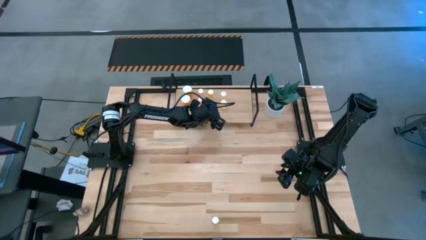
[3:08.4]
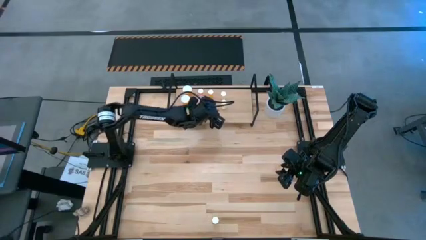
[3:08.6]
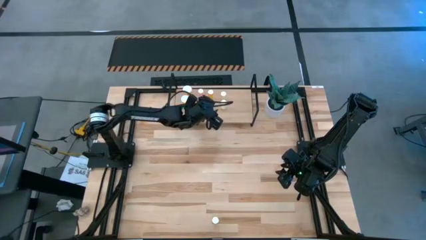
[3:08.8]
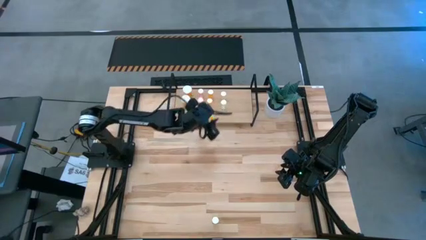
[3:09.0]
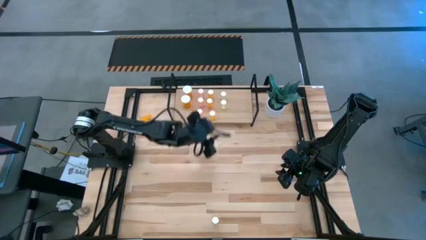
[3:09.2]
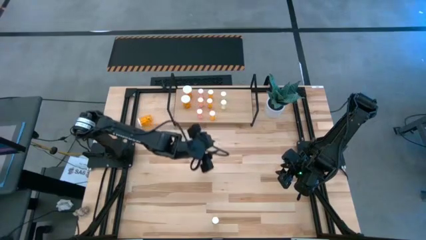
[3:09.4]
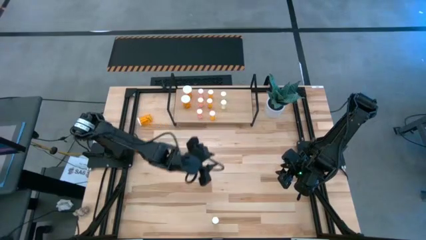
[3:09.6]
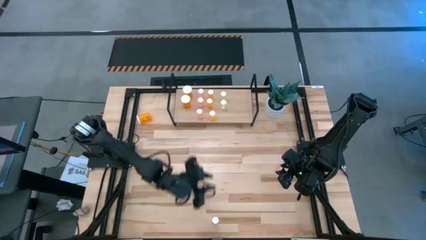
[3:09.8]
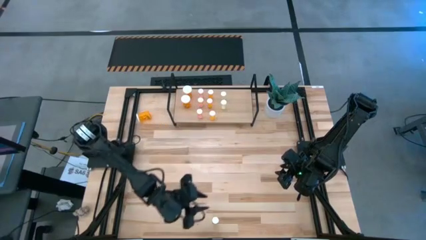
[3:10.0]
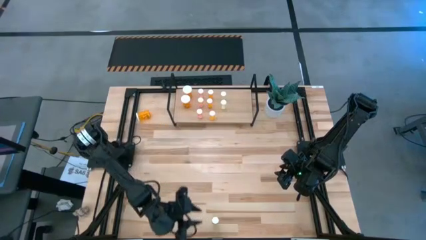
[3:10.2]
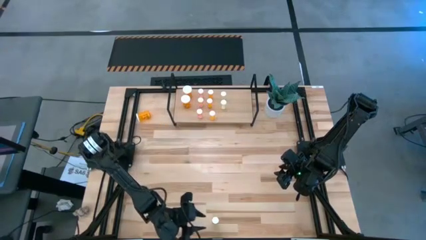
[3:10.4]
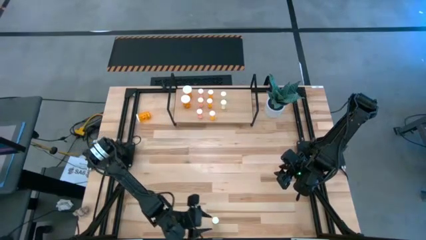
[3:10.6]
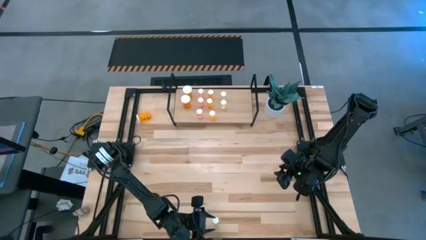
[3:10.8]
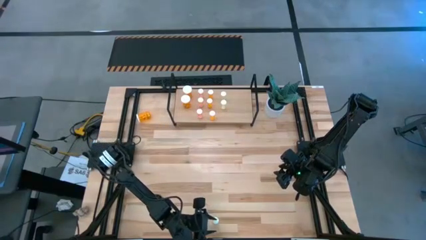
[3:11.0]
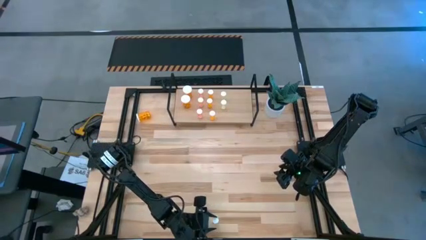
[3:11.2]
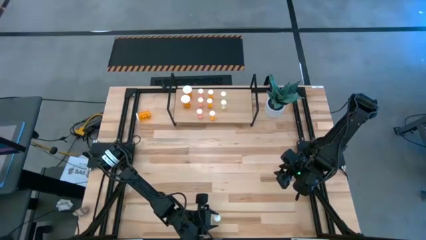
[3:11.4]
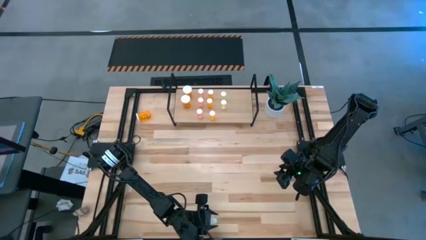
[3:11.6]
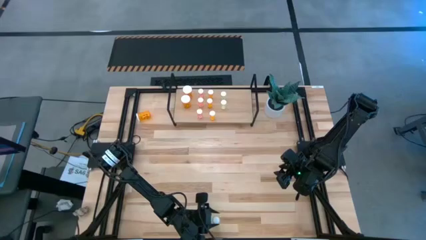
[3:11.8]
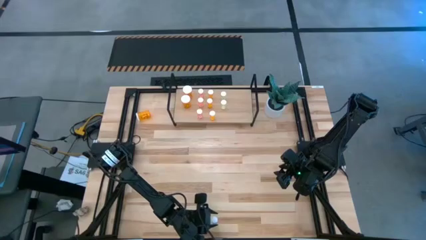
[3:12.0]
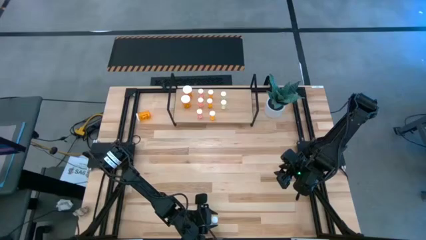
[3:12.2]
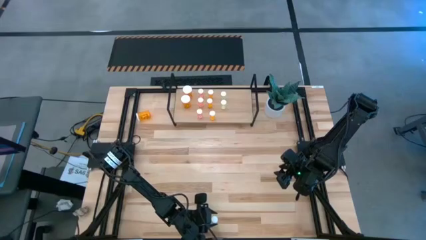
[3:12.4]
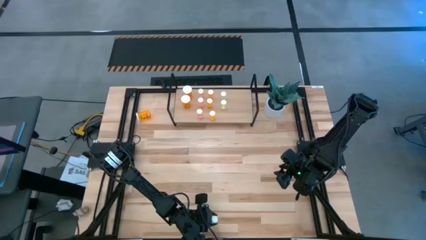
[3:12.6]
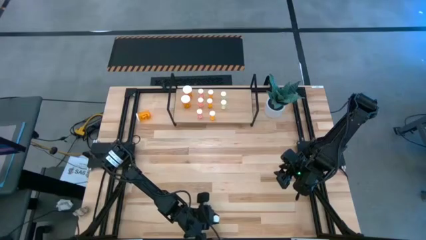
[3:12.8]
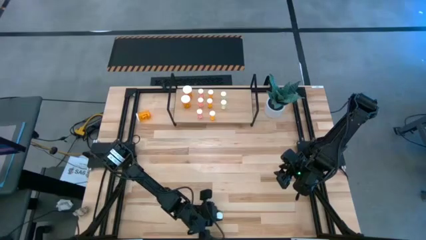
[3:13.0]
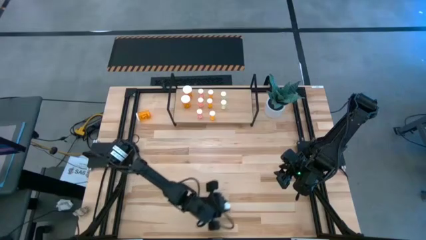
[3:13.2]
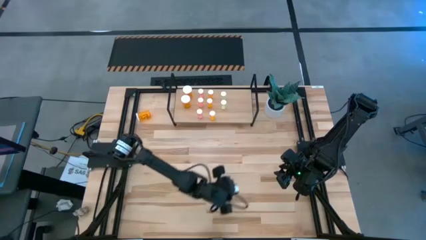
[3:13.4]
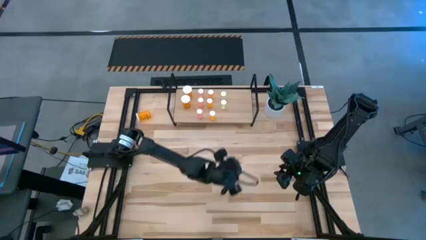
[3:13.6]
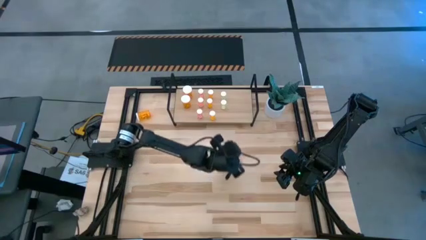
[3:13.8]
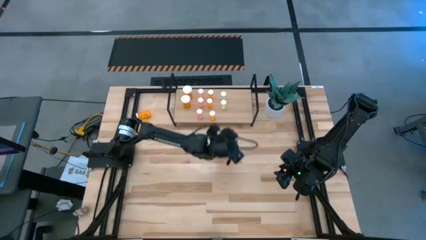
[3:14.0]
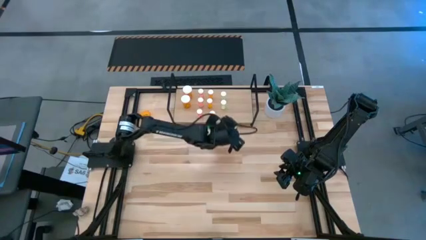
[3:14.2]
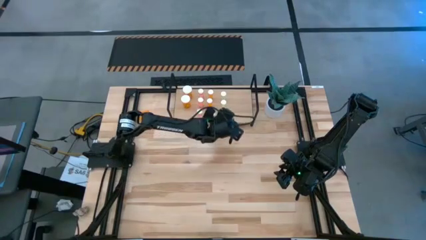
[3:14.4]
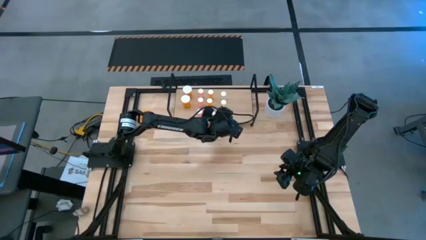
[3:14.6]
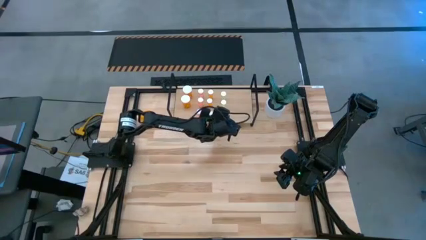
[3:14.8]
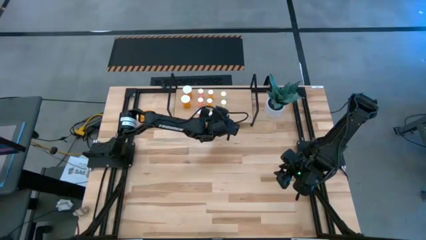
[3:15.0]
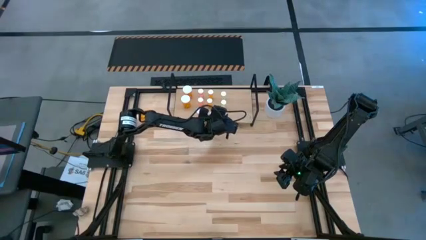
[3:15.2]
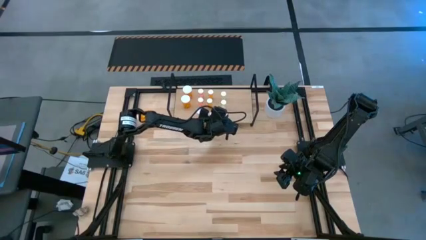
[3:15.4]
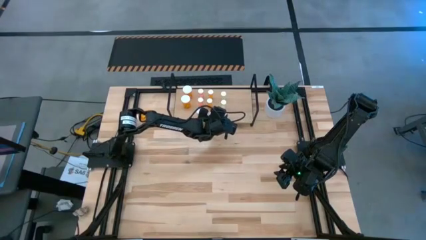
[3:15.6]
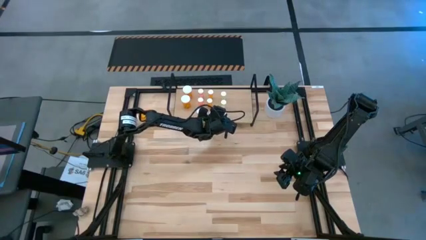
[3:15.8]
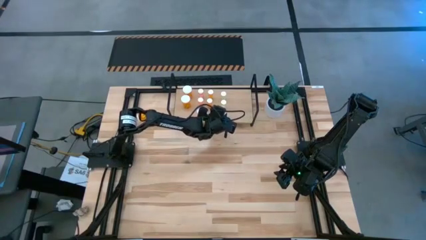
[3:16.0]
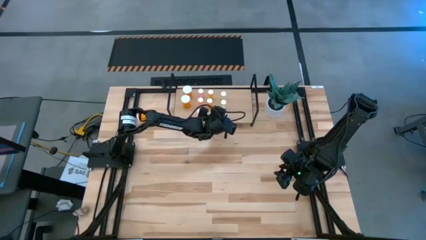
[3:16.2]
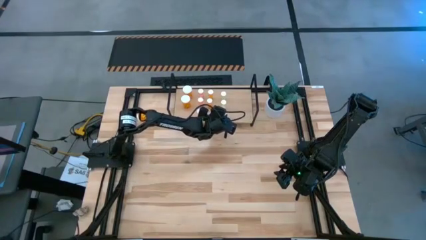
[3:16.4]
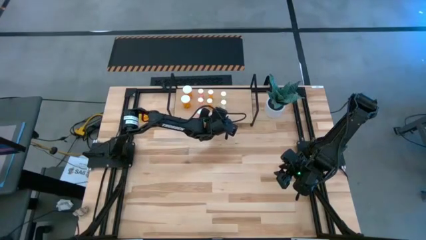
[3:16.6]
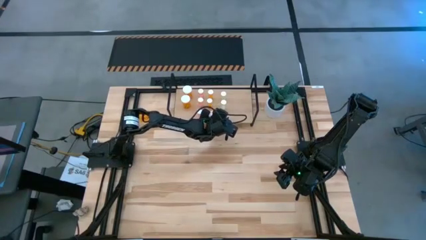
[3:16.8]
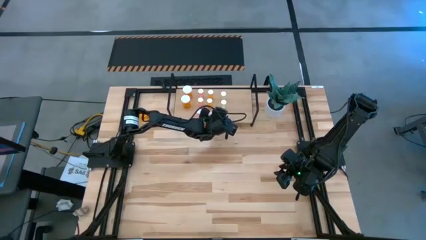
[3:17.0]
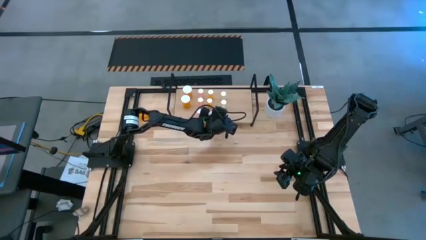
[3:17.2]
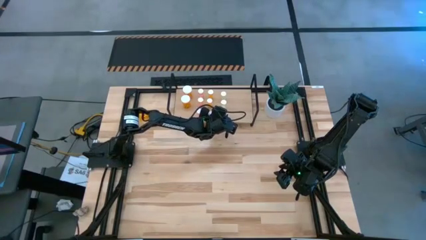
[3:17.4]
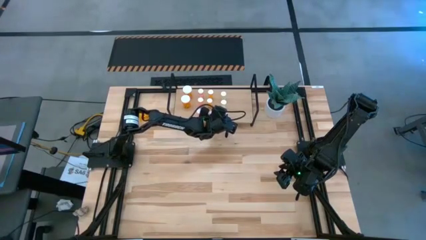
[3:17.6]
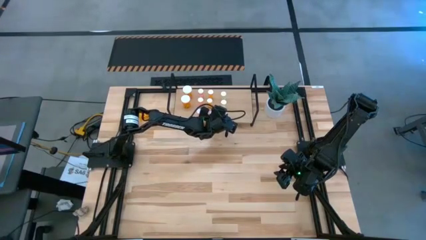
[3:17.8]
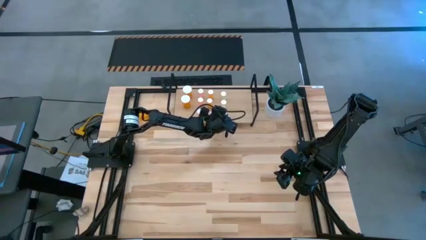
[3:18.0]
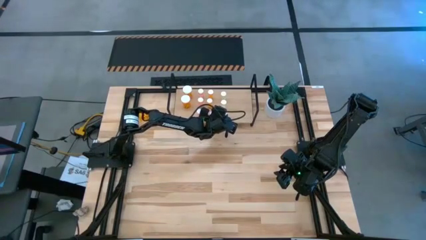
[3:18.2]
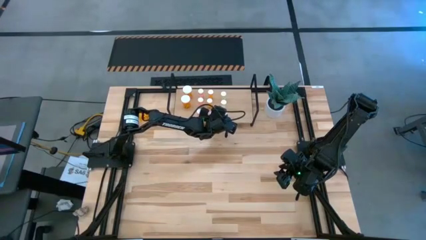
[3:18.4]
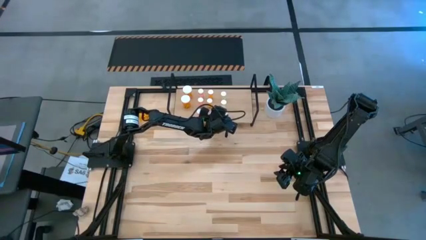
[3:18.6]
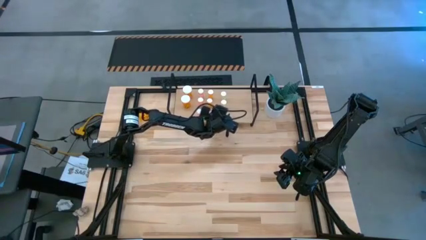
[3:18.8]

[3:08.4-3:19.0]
Task: Pick and place medicine bottles onto shelf by color
Put the yellow pill bottle on the shelf aligned with the other yellow pill bottles

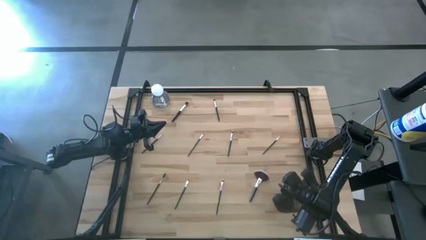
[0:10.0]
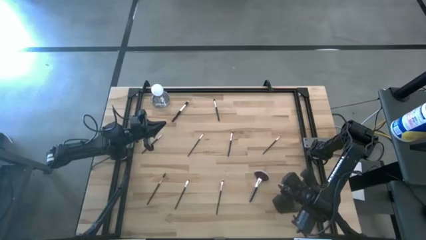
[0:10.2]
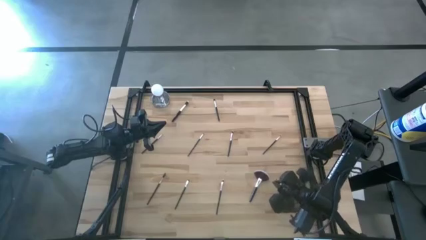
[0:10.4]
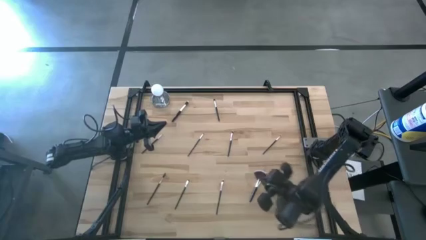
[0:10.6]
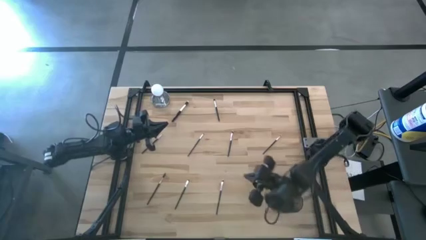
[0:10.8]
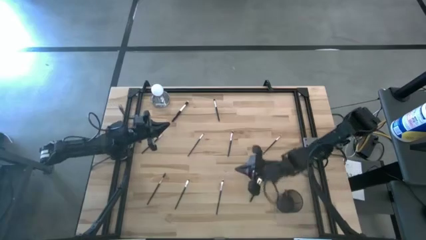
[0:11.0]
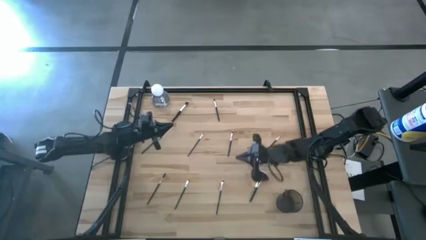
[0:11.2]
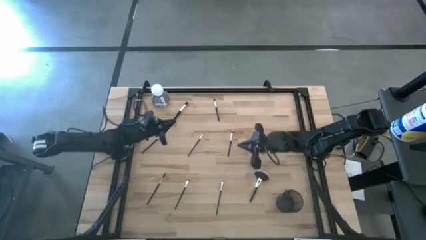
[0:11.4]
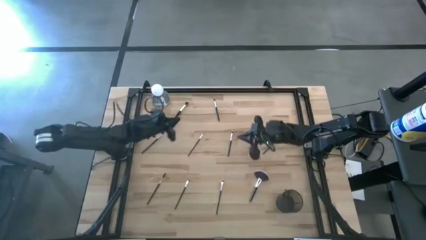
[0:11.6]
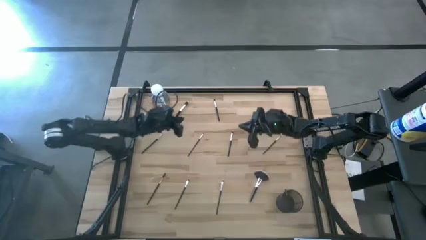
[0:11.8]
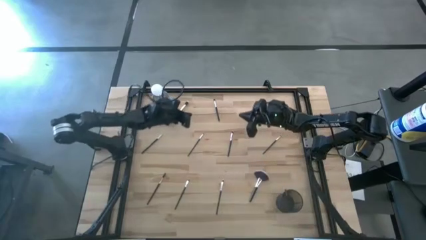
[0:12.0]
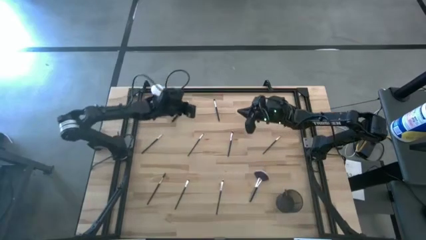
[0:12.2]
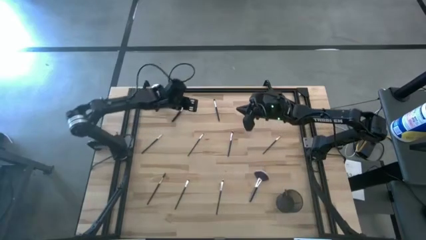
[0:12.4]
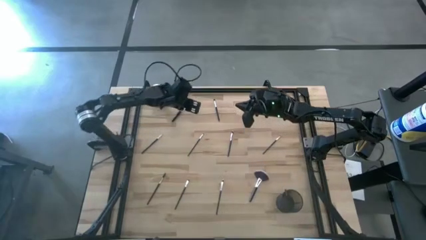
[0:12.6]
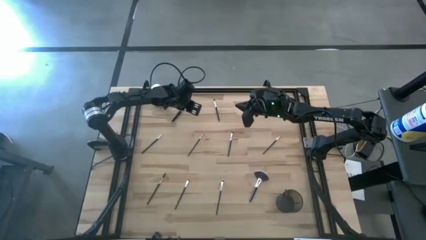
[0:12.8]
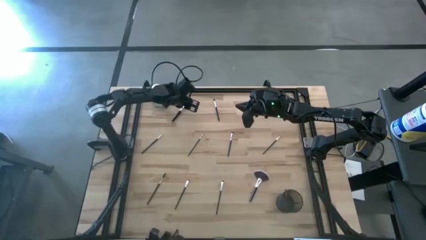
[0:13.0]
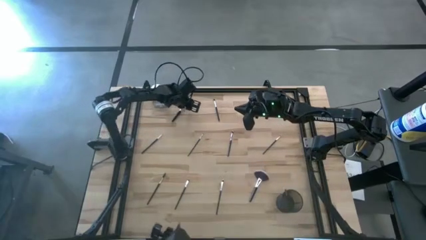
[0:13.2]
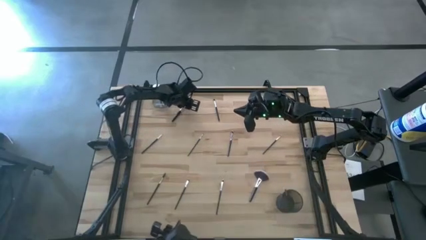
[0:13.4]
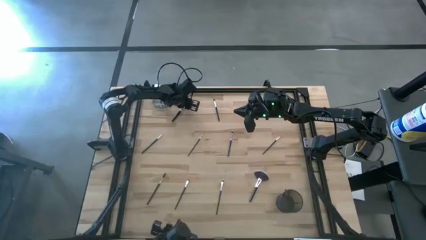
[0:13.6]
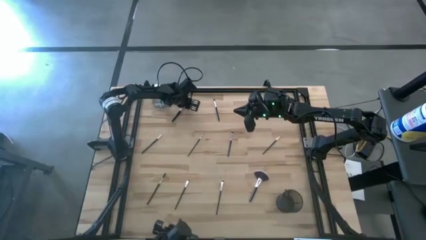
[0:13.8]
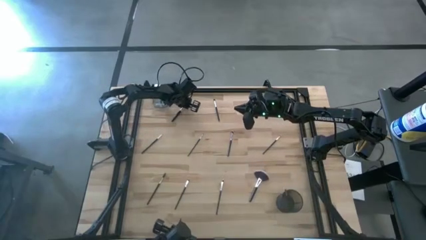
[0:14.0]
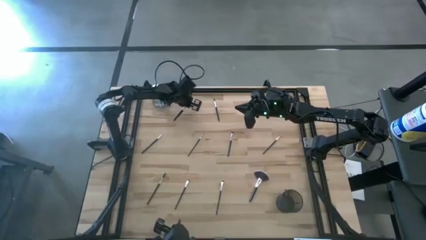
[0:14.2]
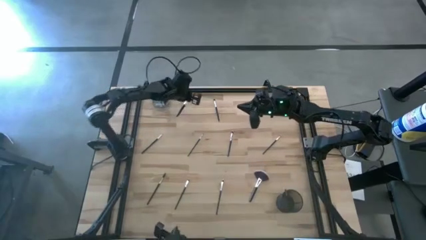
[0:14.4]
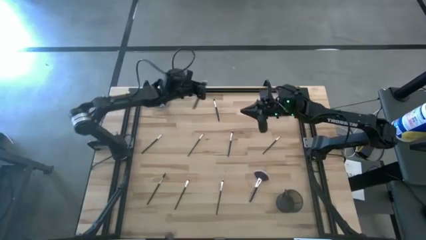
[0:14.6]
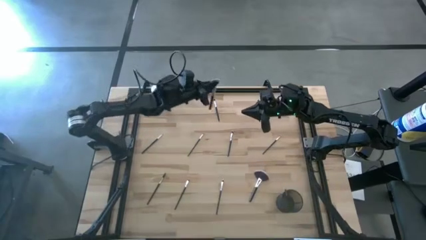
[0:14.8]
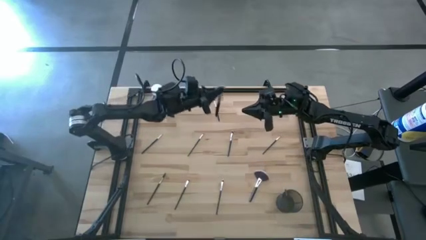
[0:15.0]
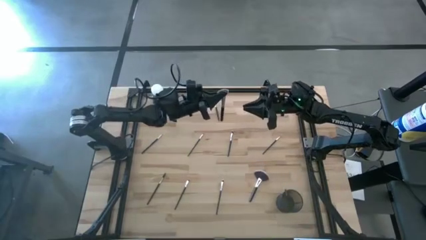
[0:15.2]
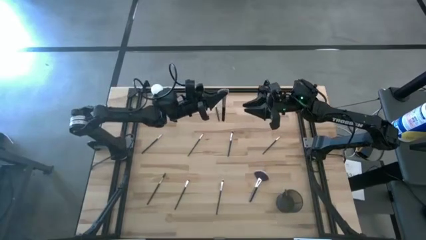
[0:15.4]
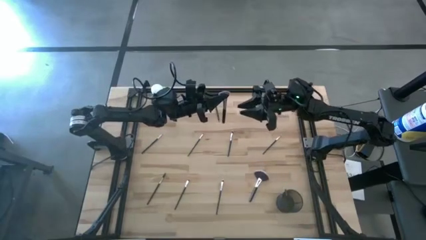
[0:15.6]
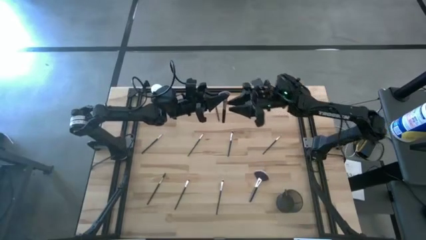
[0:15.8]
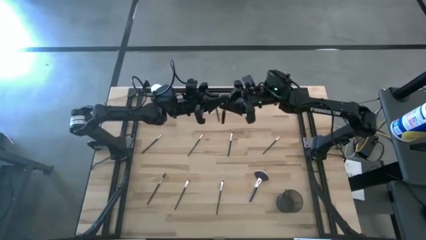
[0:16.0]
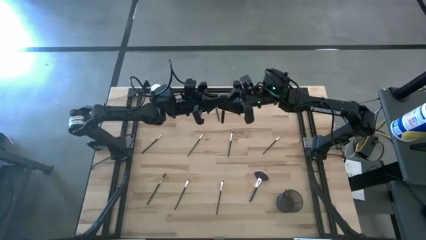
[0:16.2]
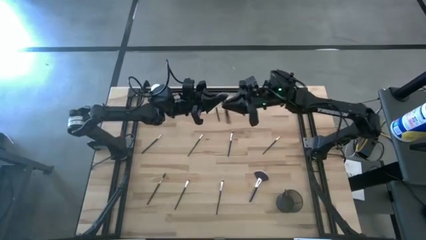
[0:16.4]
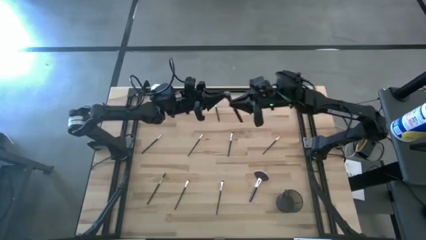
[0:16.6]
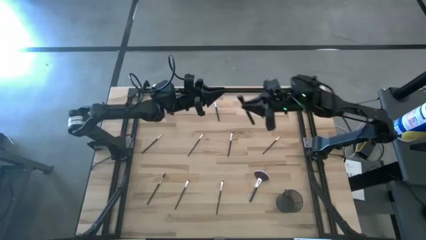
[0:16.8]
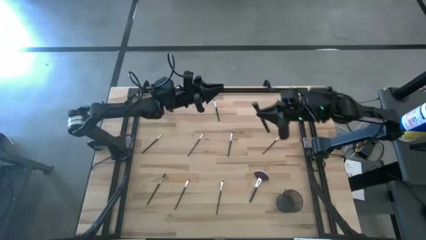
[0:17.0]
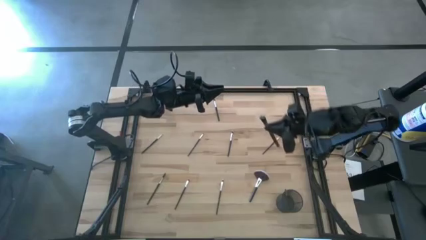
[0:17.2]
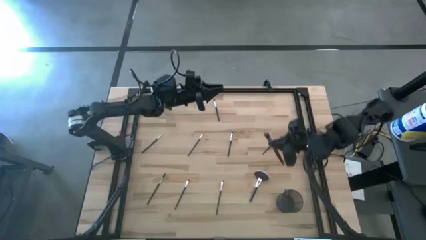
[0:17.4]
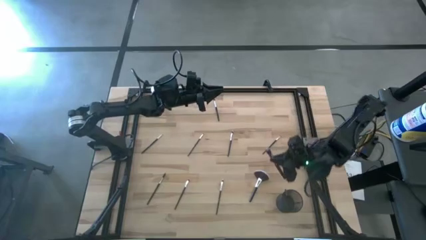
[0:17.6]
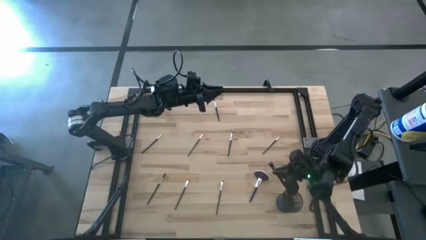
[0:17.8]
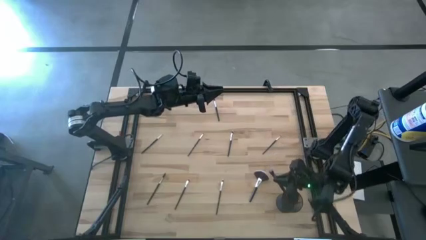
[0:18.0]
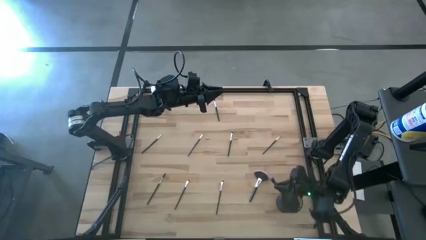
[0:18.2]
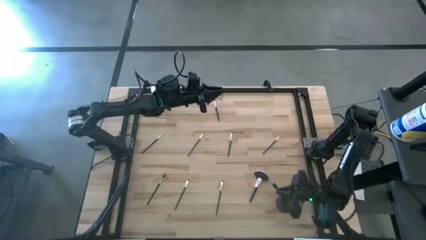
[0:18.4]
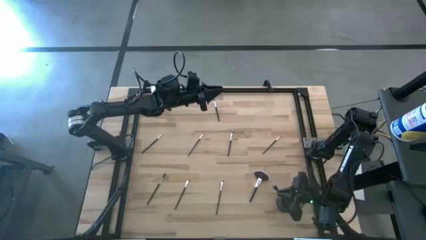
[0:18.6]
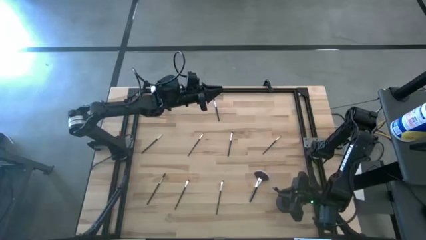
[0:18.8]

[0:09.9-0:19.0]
Task: Put items in baskets/containers
Put the foundation brush into the brush holder
